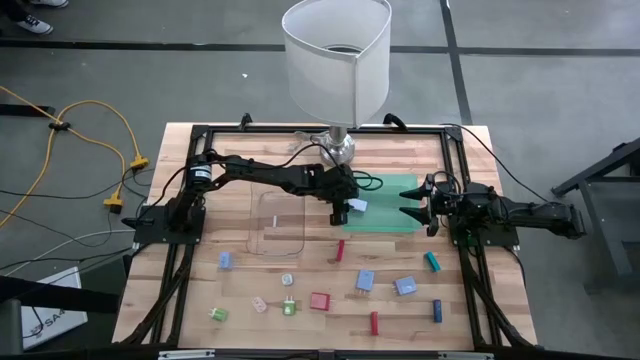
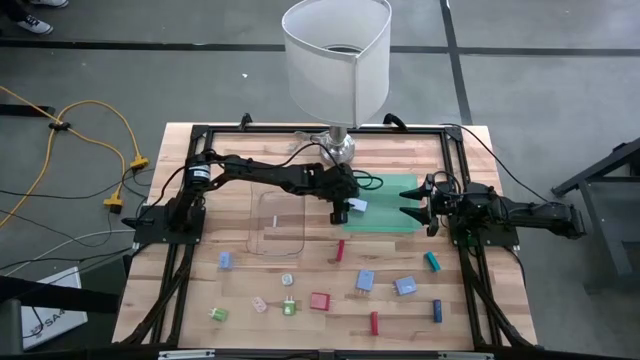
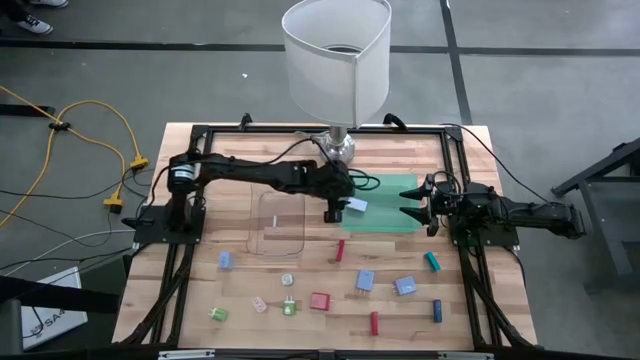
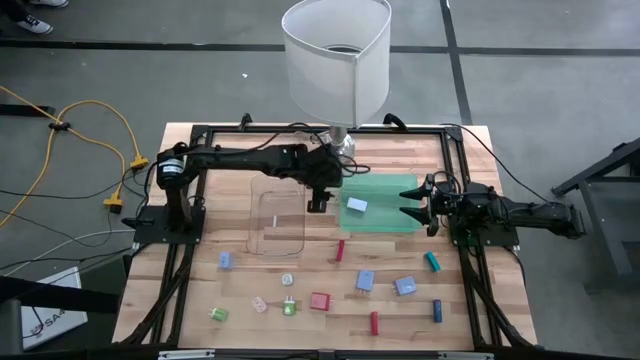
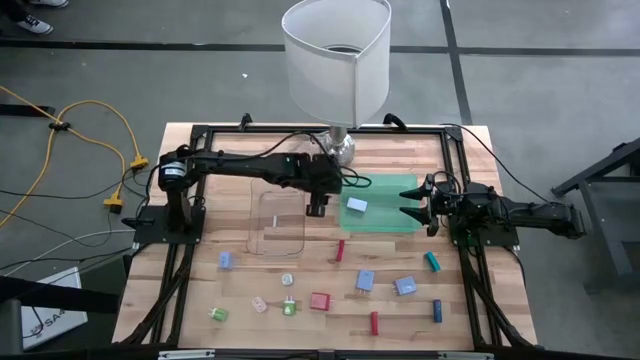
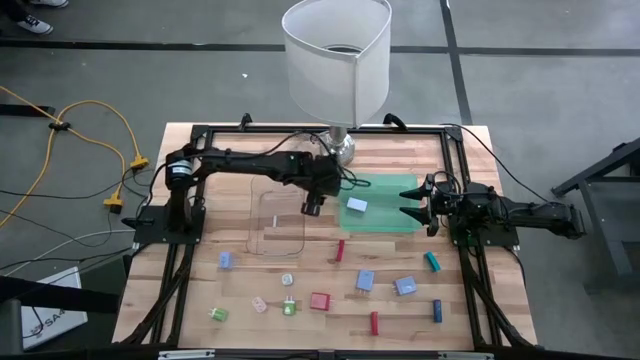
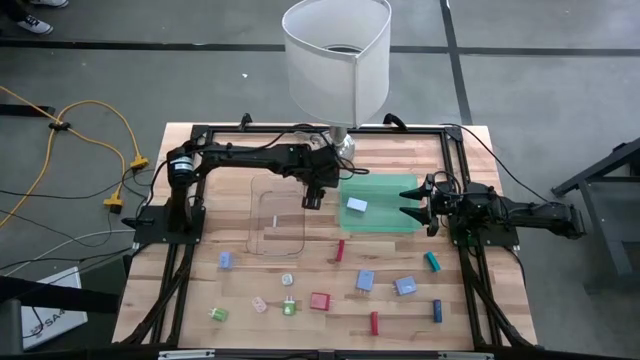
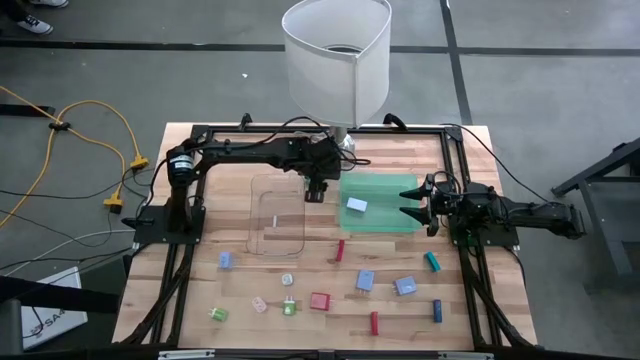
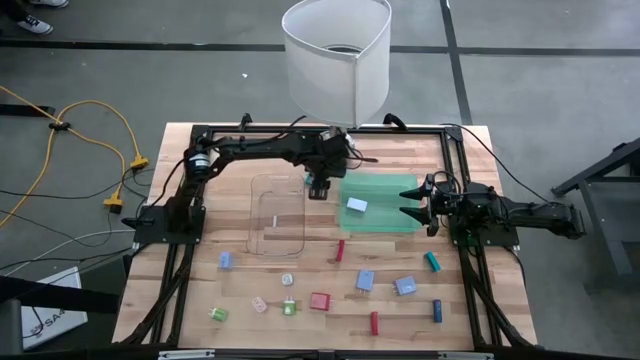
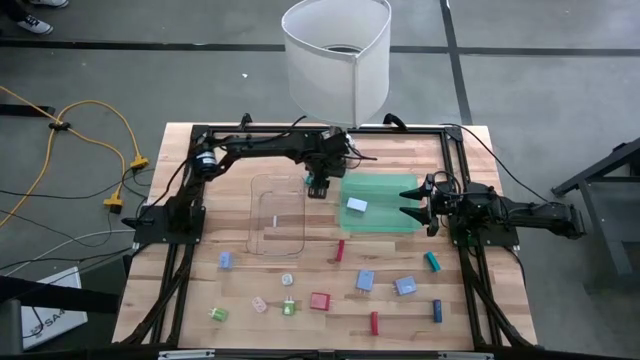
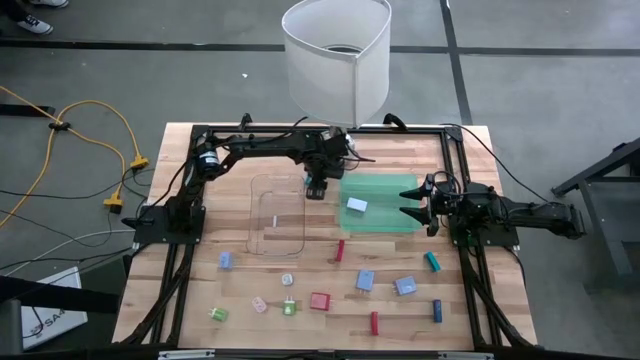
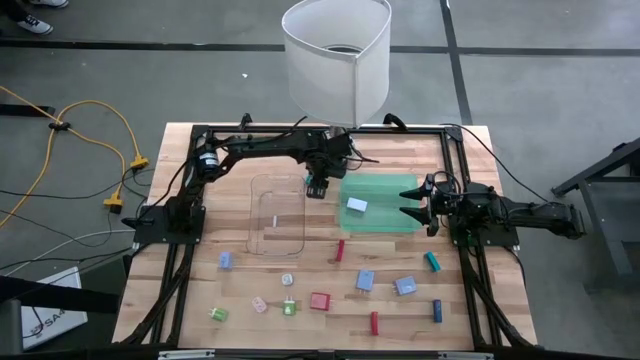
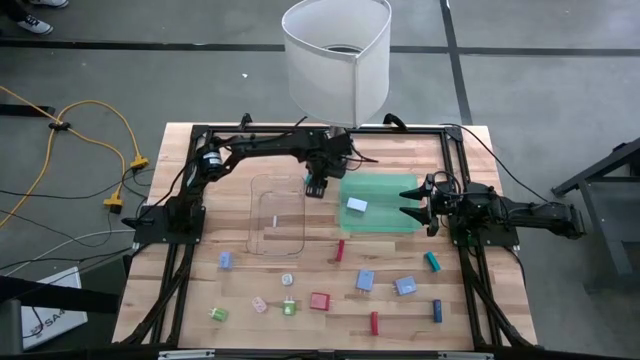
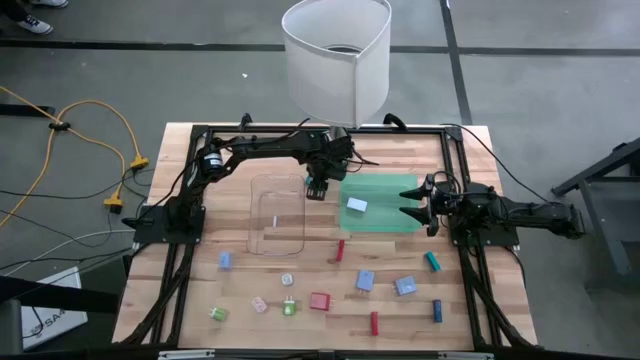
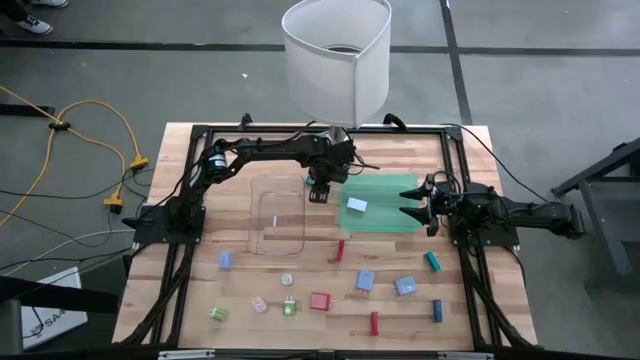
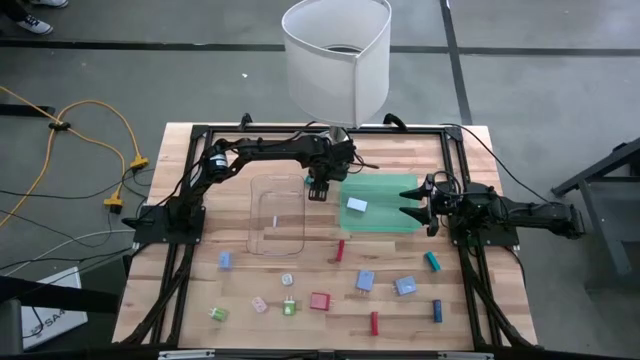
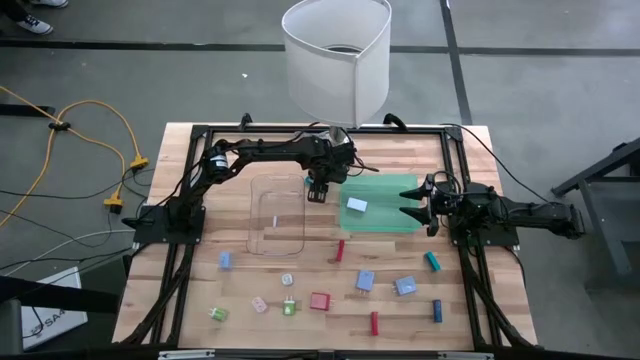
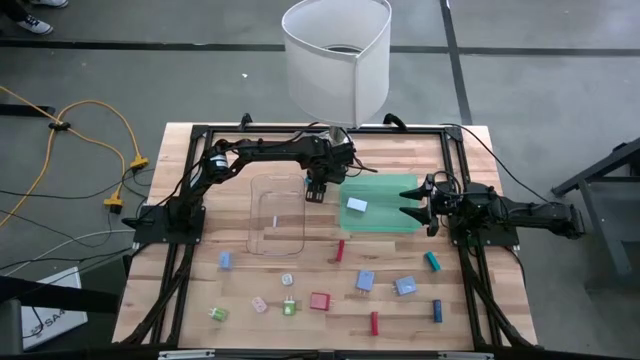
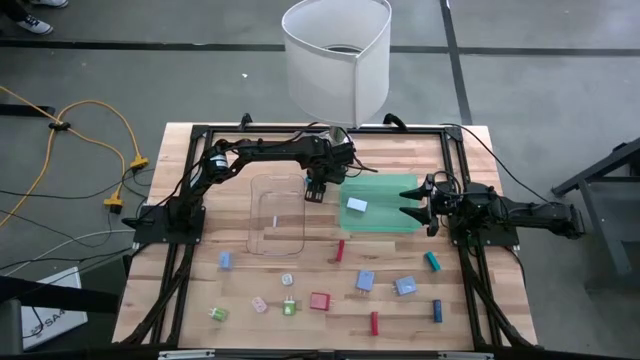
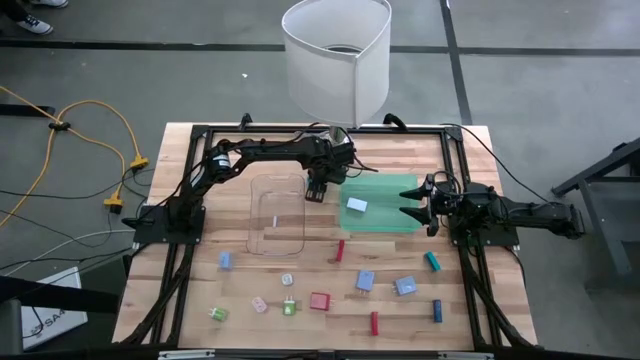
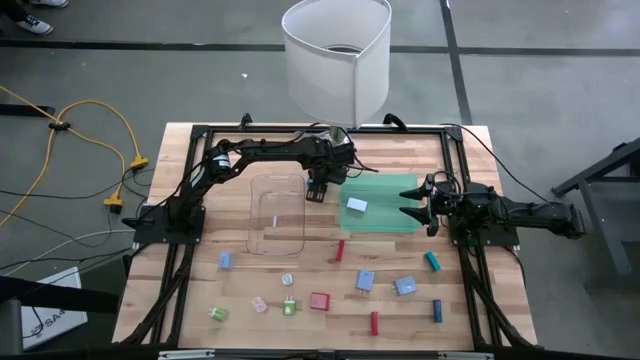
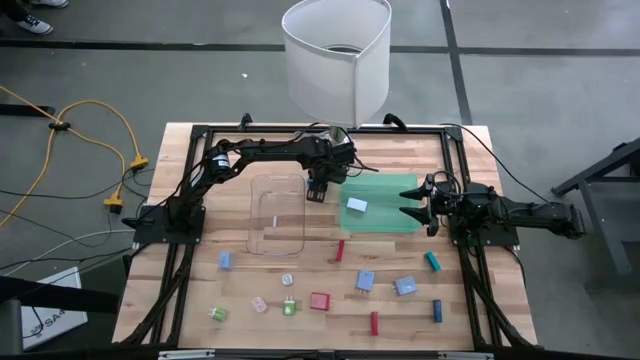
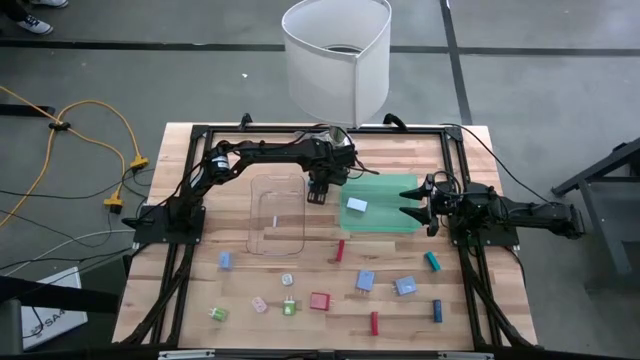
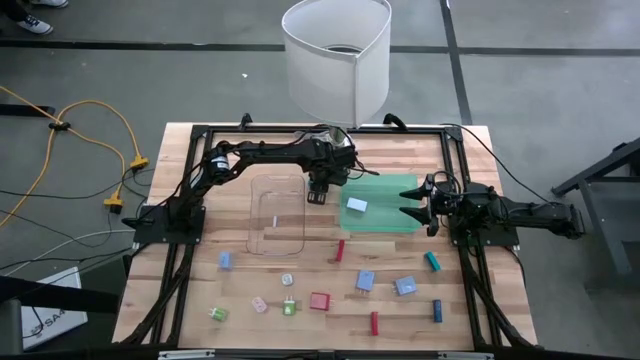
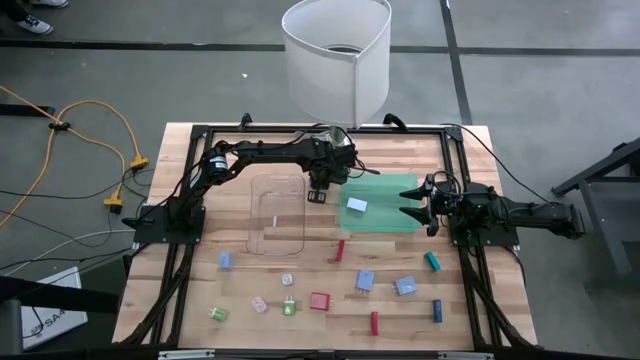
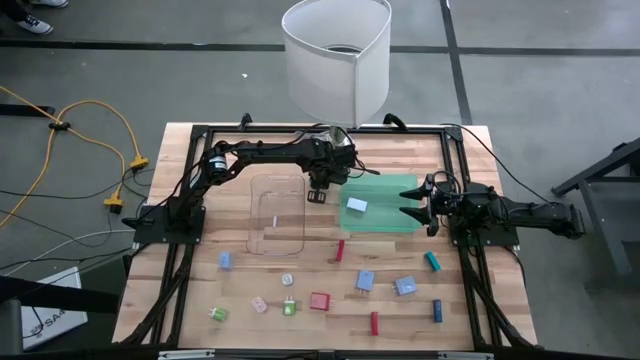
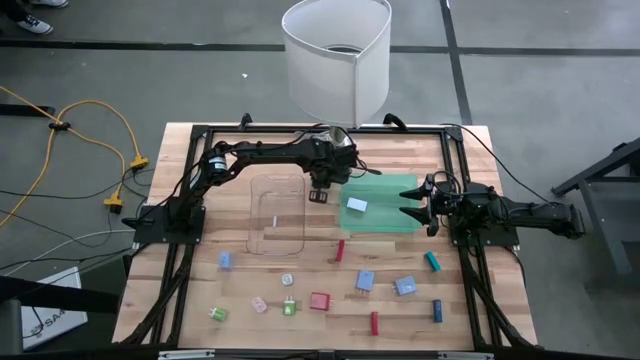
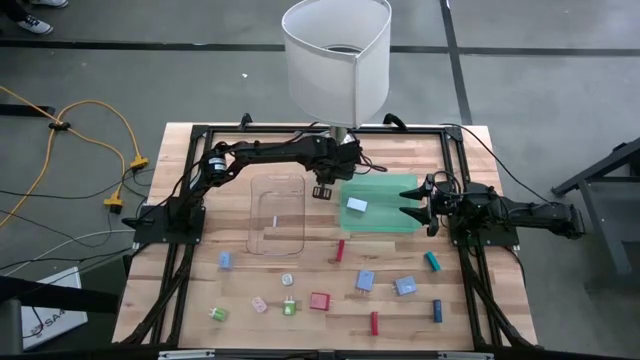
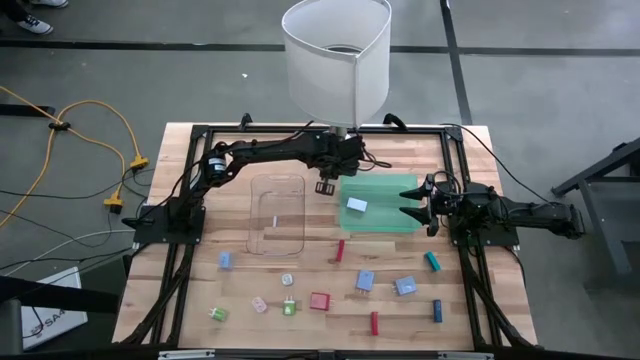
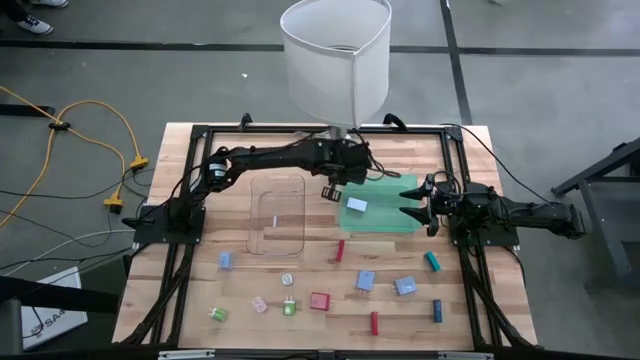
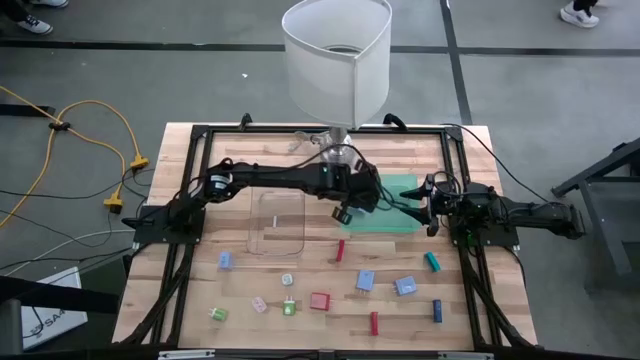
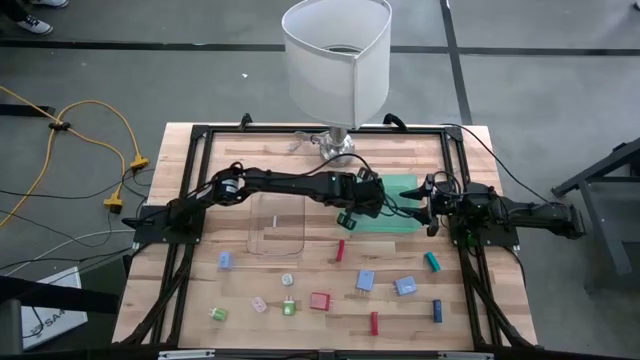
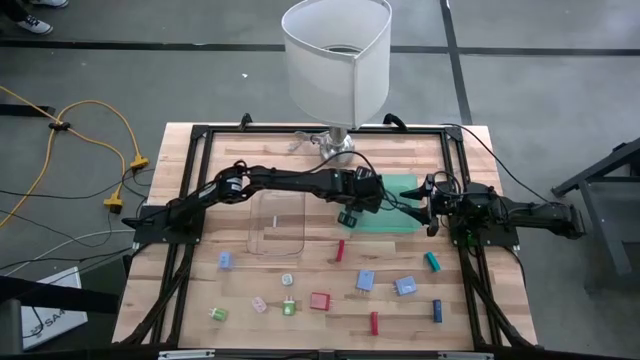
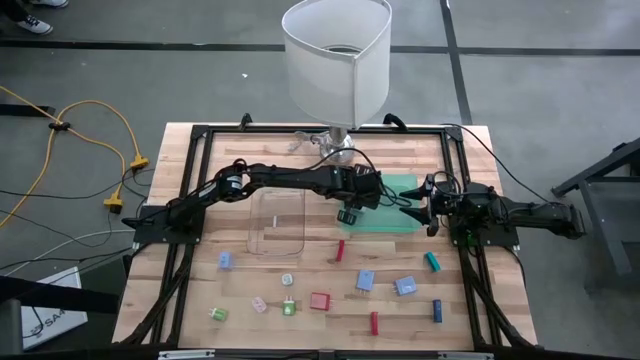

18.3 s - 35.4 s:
Task: Pick & Place Office items
Put the top blue timer into the green bin

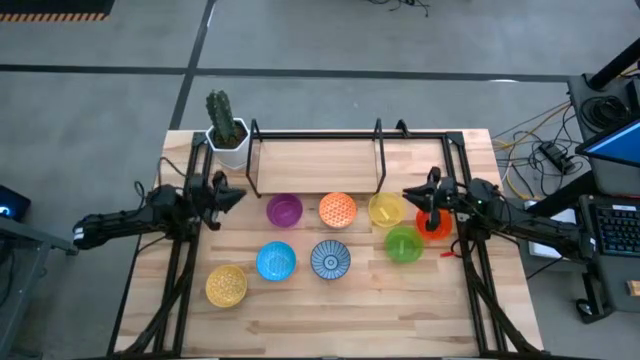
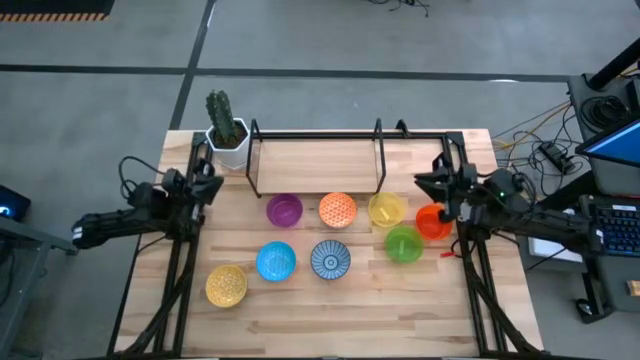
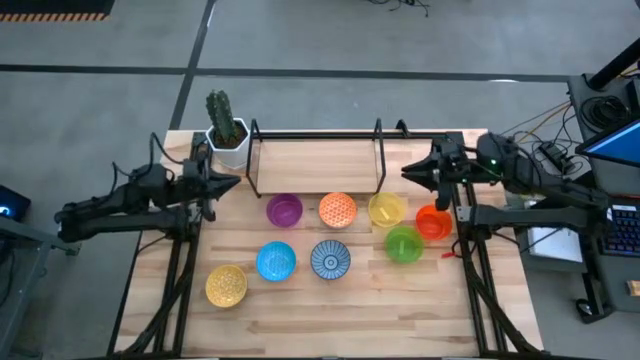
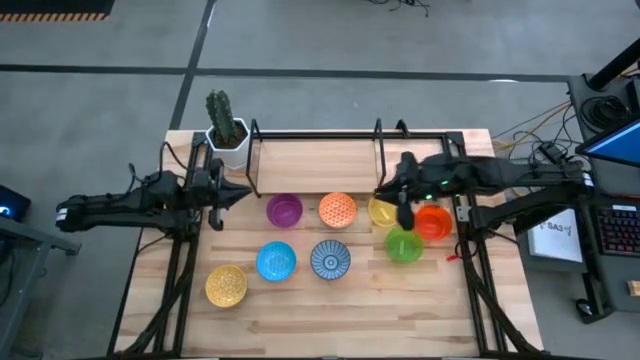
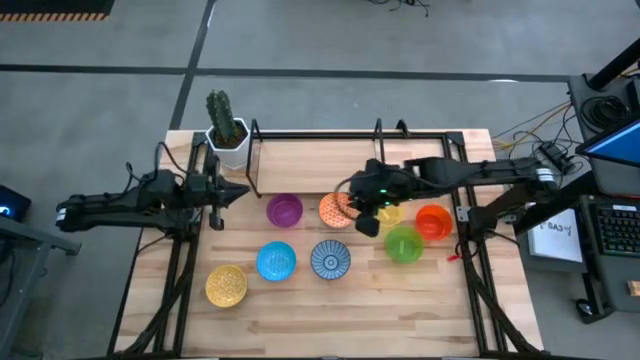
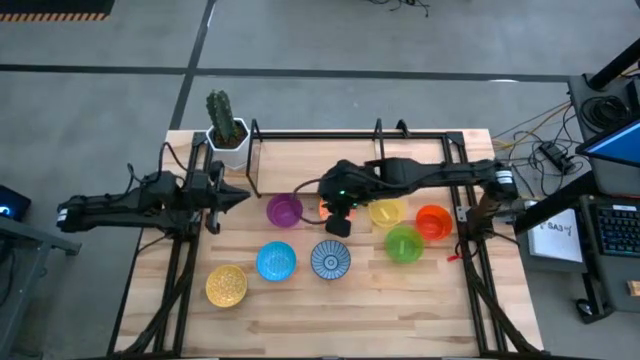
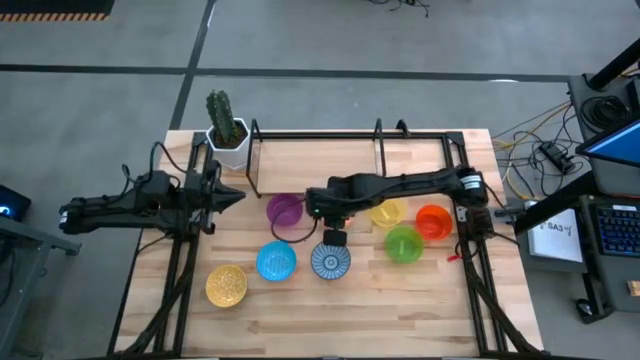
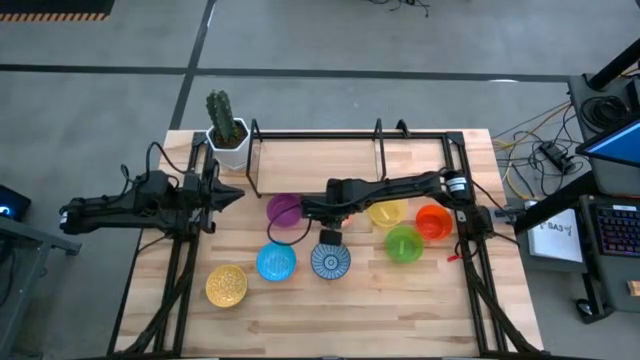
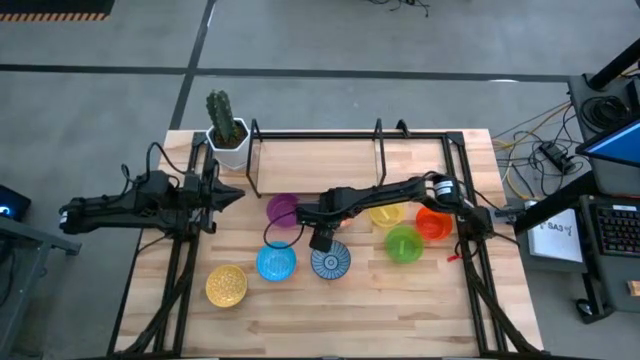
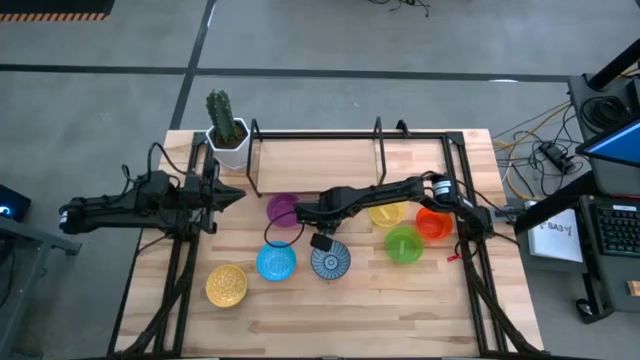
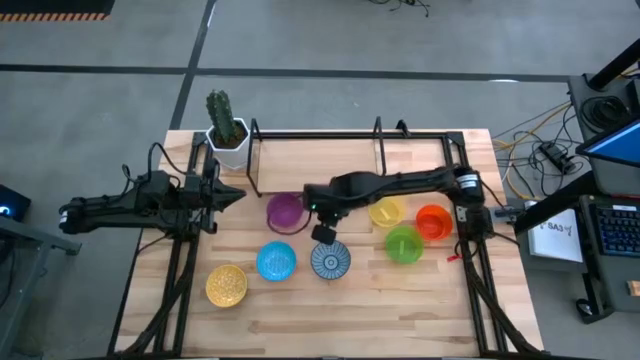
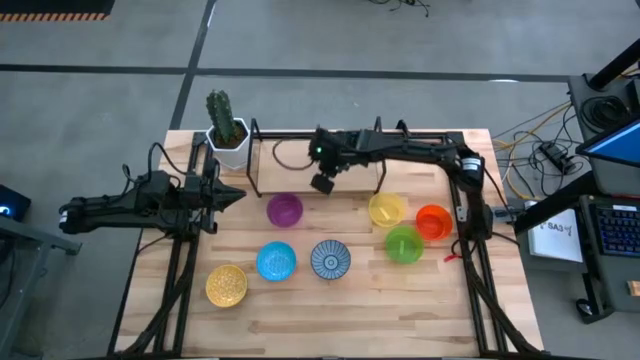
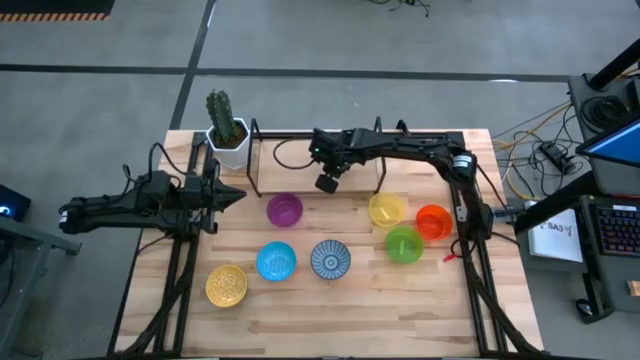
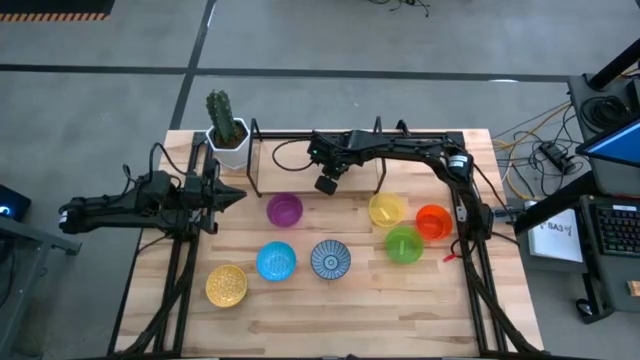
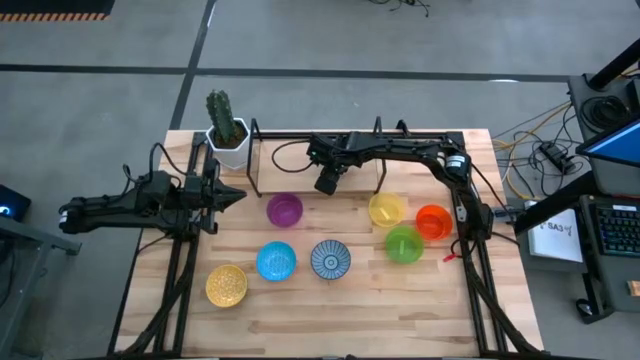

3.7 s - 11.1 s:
Task: Place and stack bowls onto a shelf
Put the blue-orange patterned bowl on the shelf
